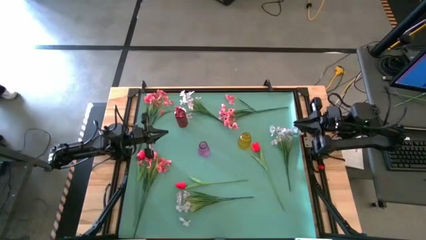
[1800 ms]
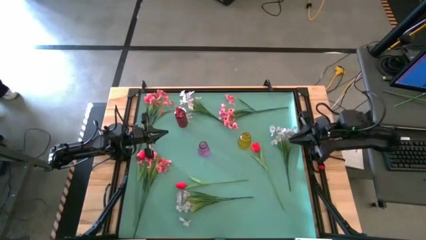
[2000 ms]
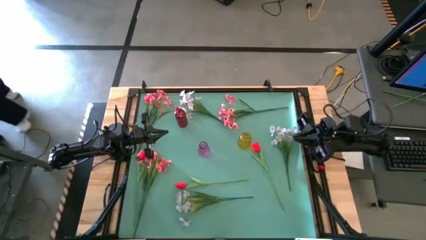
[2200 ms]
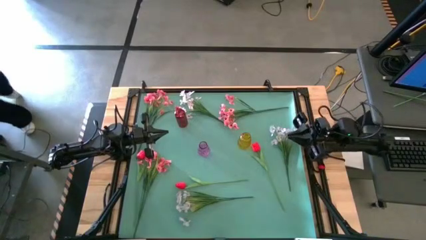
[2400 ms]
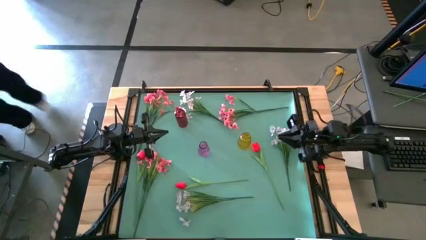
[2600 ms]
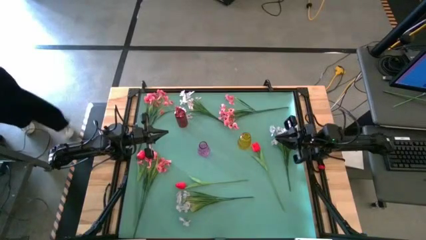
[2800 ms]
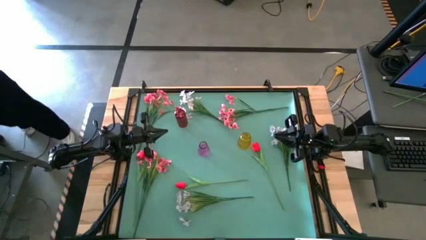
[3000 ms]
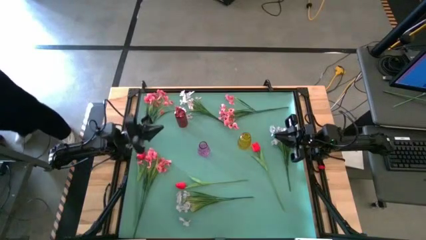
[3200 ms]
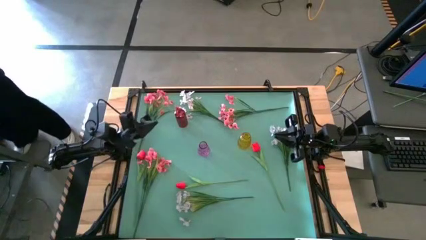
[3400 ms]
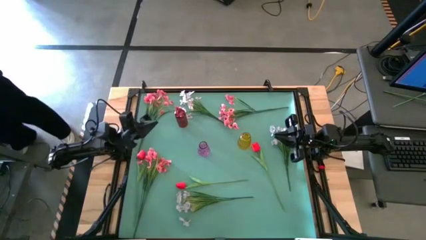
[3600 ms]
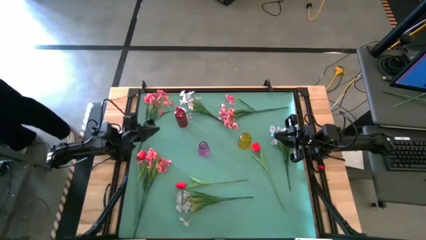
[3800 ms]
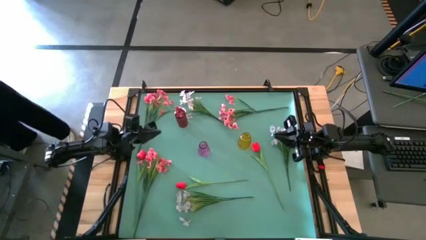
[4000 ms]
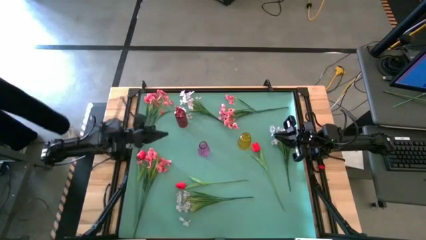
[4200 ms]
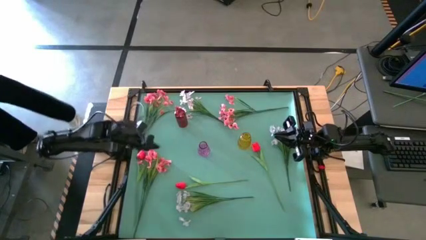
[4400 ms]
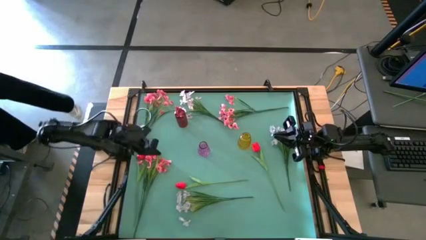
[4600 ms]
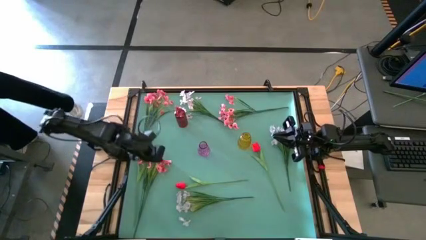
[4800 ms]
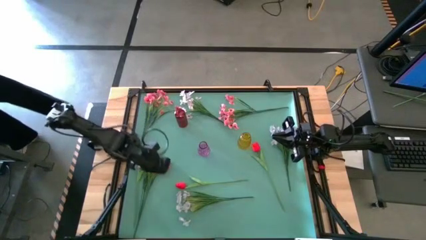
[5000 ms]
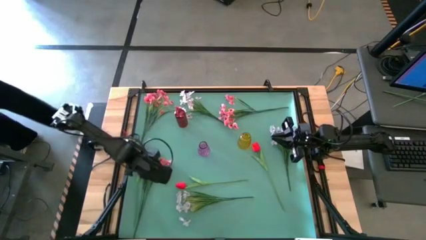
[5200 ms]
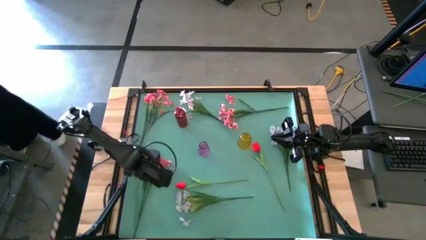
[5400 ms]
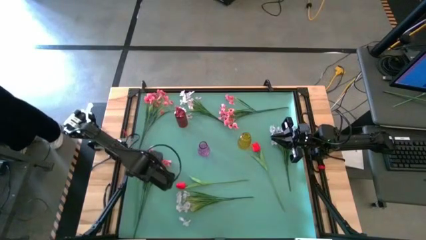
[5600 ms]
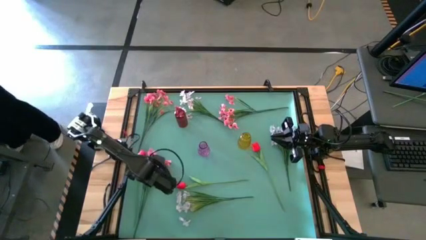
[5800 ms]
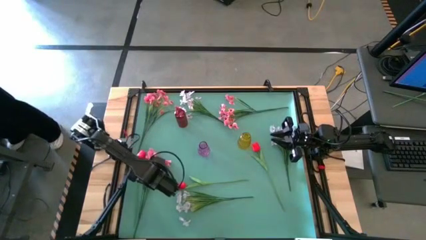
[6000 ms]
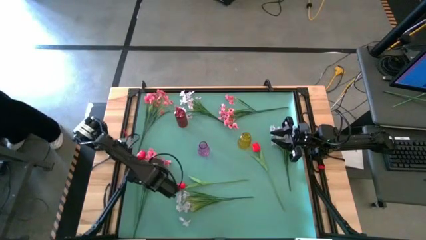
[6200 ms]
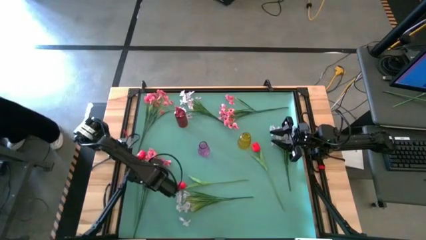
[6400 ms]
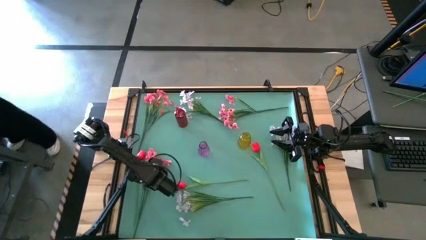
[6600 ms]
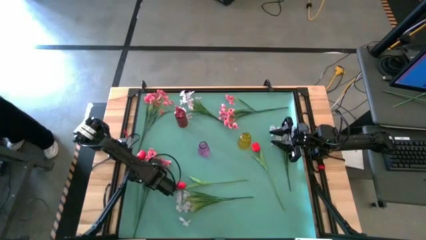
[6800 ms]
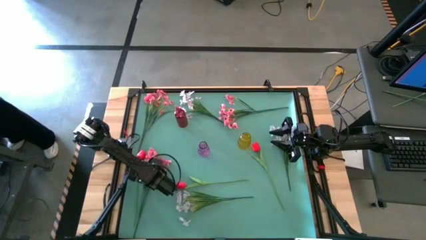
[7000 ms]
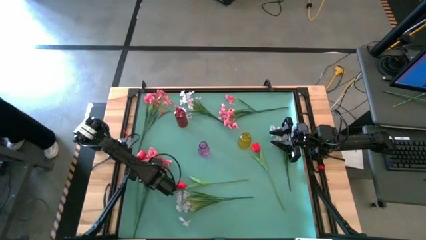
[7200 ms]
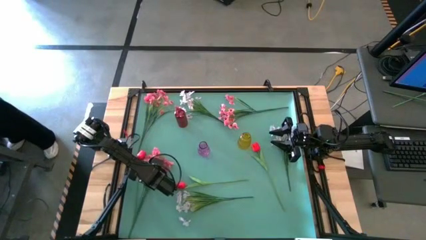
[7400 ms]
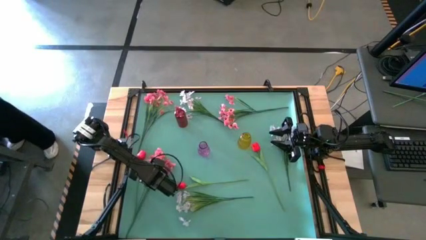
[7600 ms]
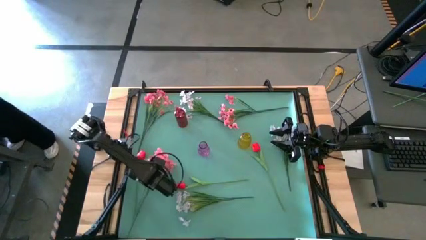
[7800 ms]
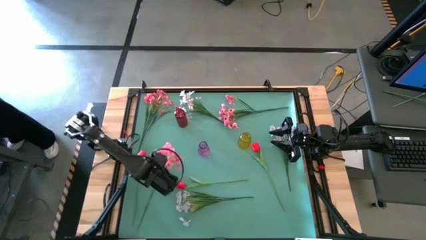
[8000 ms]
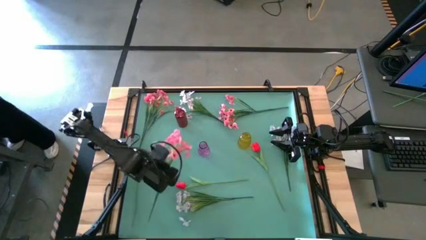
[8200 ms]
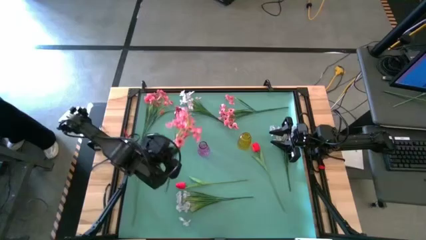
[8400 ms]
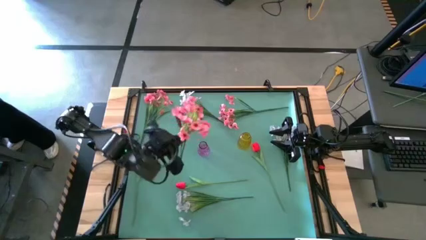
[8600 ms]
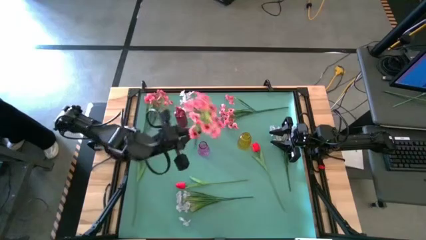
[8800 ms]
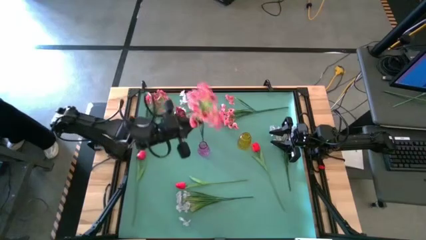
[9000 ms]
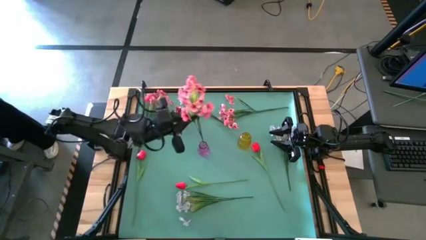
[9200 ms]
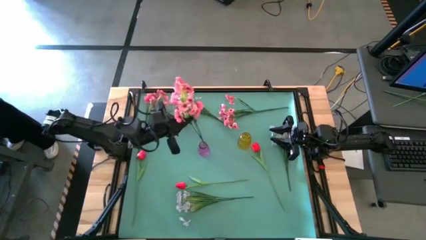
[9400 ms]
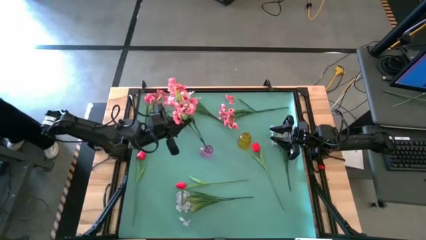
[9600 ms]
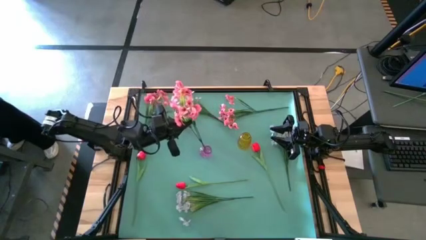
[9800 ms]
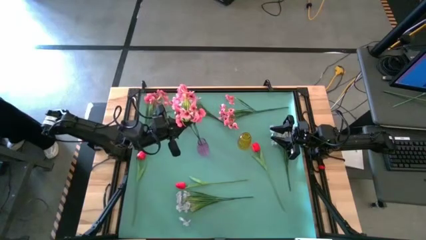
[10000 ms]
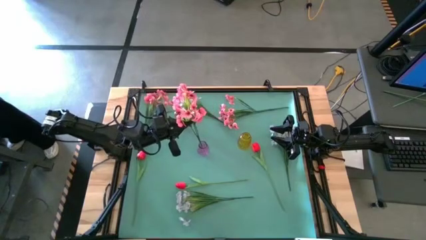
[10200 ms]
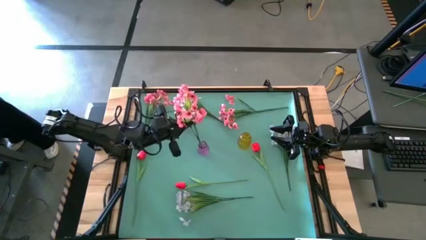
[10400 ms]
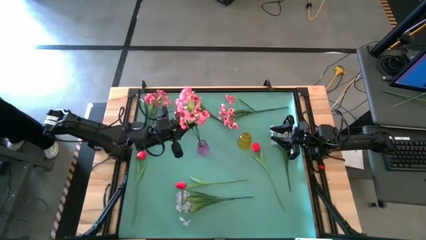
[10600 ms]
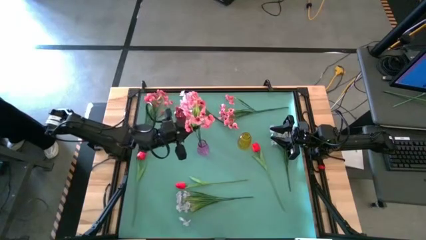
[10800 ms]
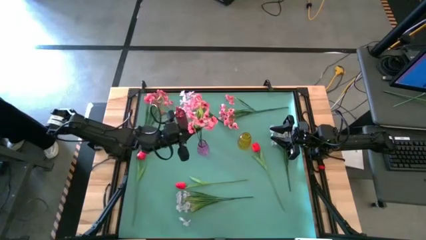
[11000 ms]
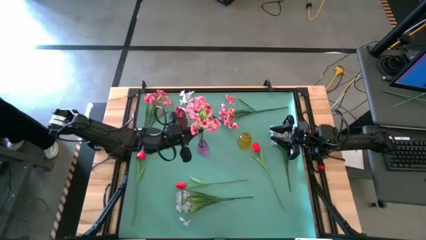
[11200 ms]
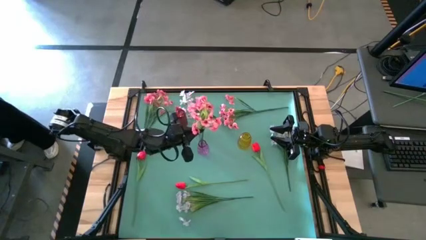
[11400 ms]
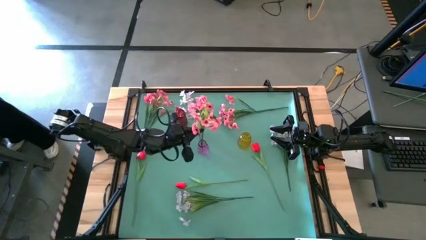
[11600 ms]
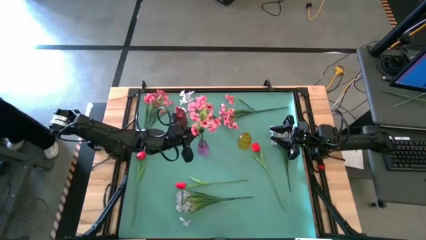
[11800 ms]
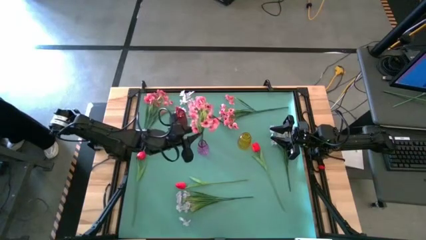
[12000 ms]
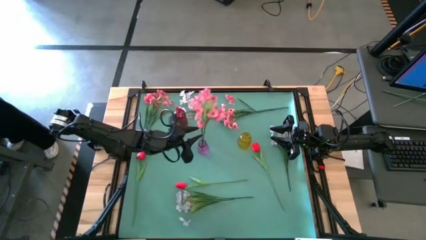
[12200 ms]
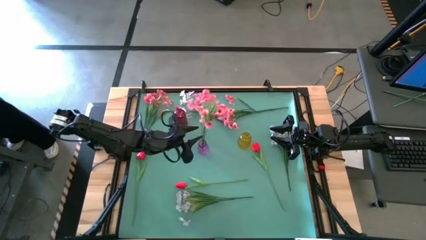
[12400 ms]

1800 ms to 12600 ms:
Task: Sort flowers into vase by color
Put the bottom left pink flower into the purple vase
